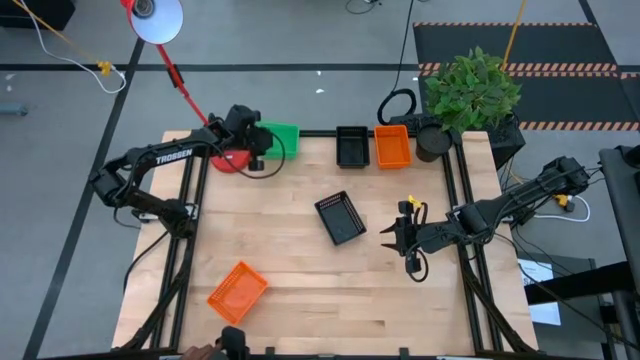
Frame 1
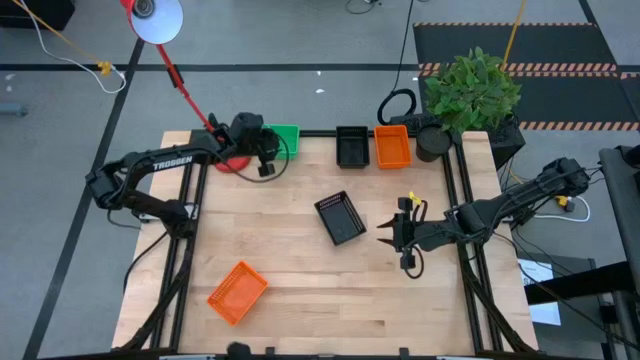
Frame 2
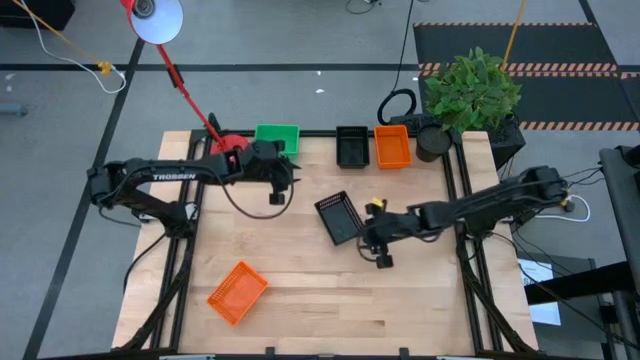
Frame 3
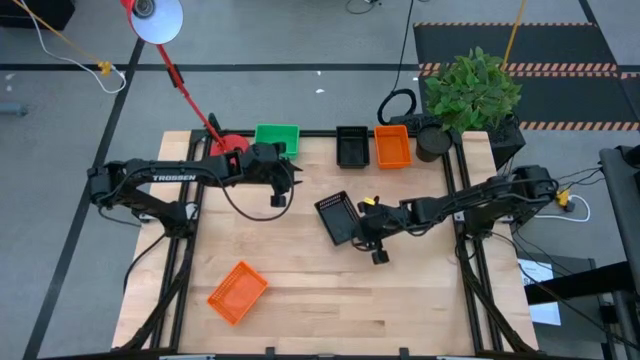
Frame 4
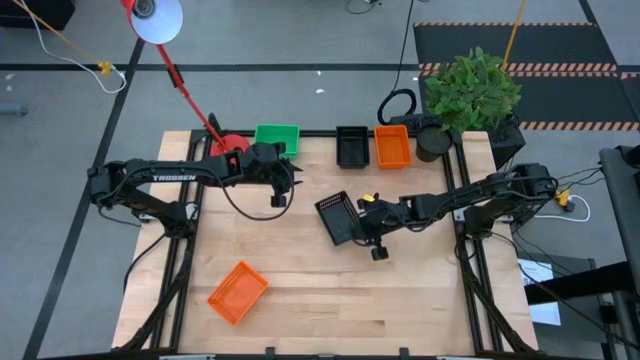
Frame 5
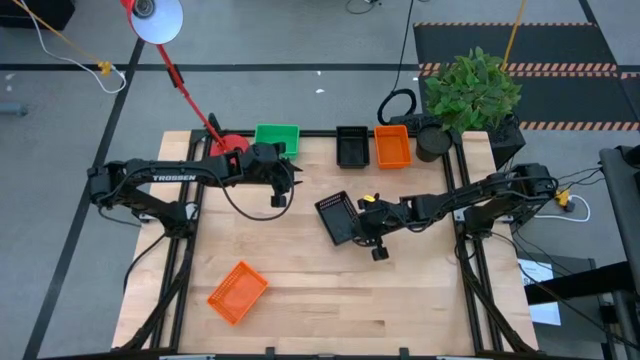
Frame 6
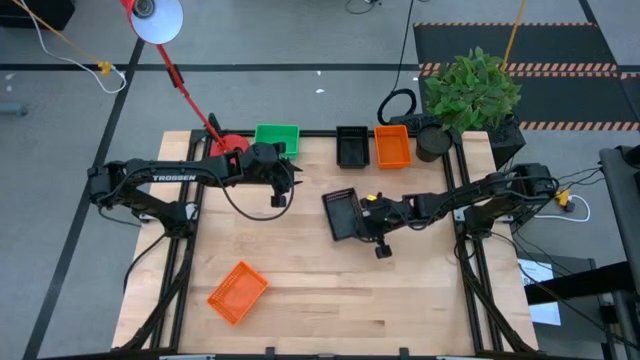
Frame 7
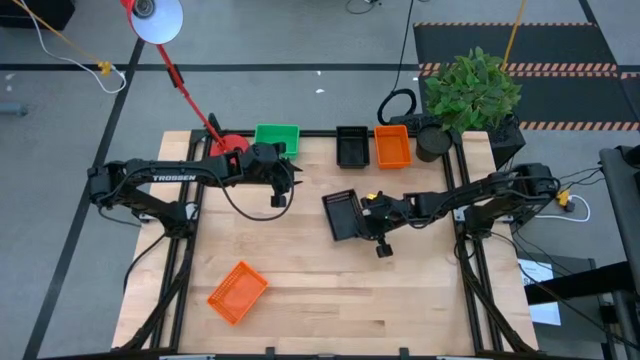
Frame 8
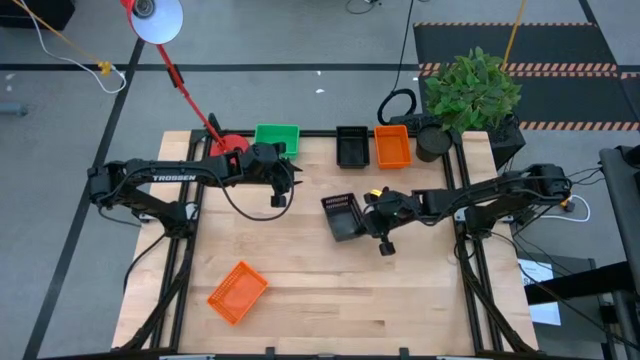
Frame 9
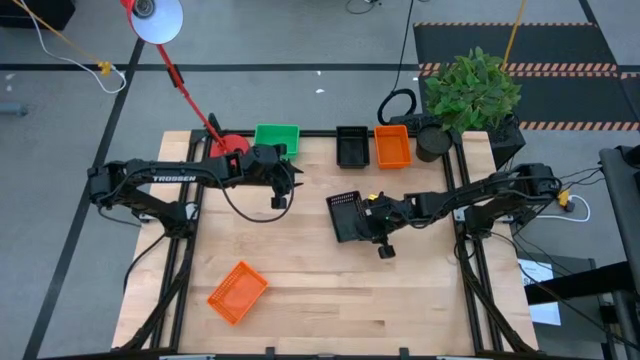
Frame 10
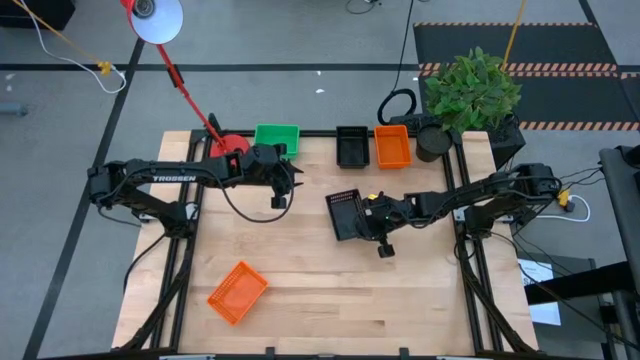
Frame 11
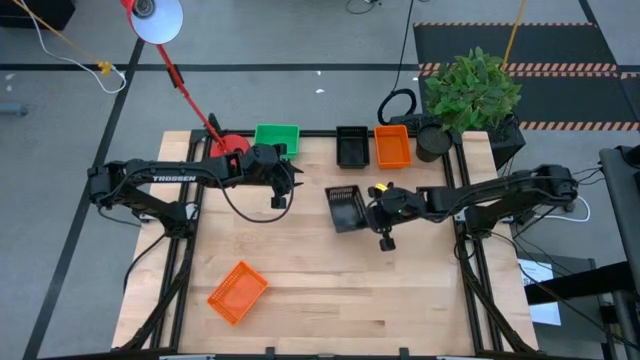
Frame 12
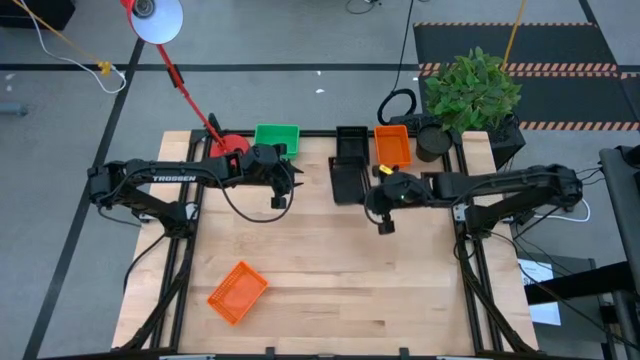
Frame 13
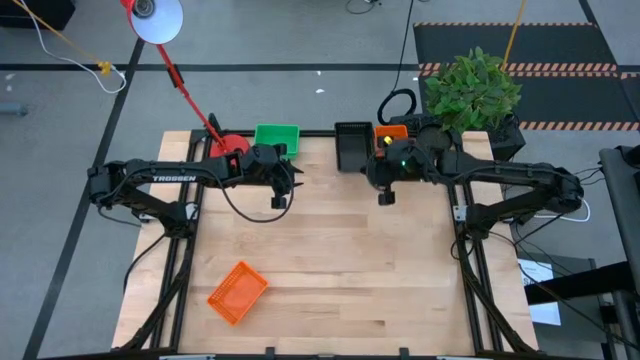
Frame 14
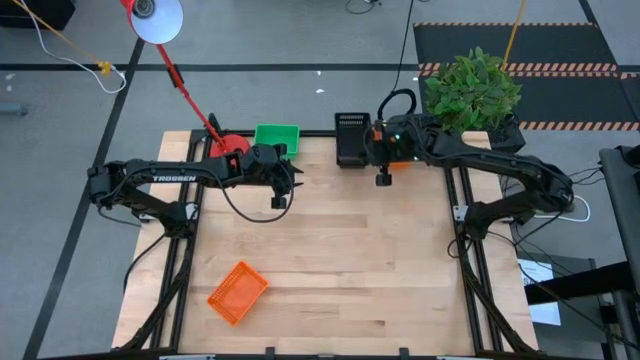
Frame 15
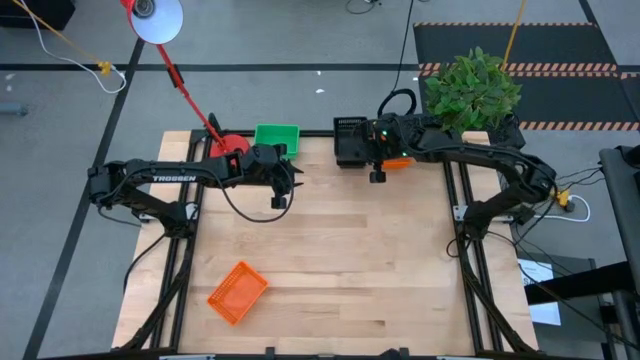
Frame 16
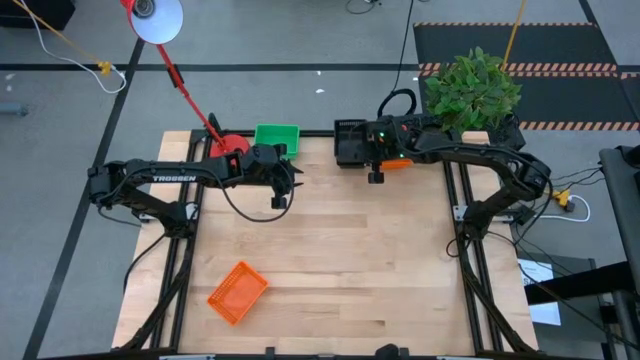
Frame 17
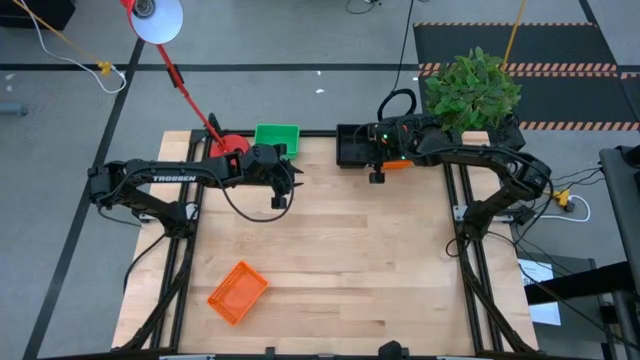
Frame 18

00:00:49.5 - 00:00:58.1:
Stack the bottom black bin on the top black bin

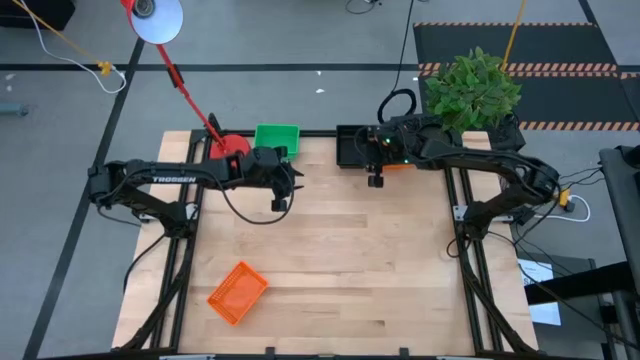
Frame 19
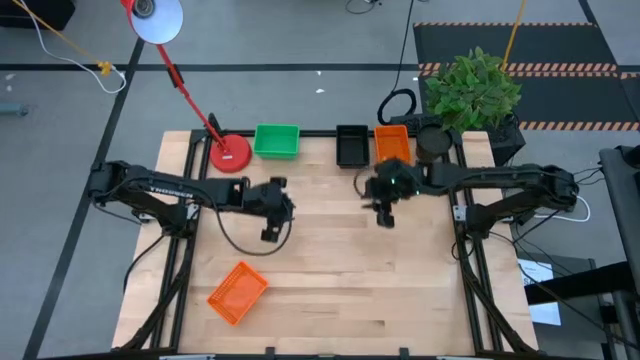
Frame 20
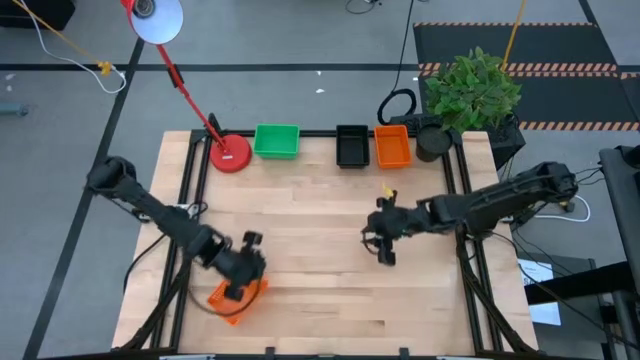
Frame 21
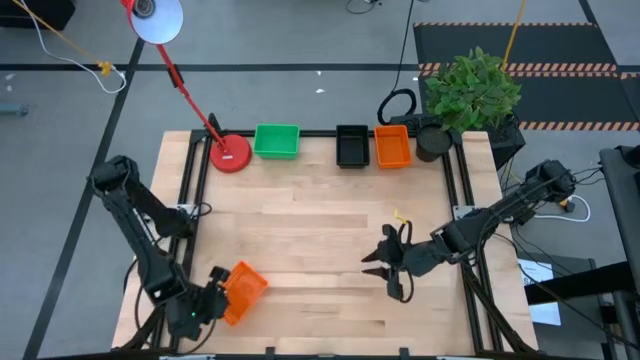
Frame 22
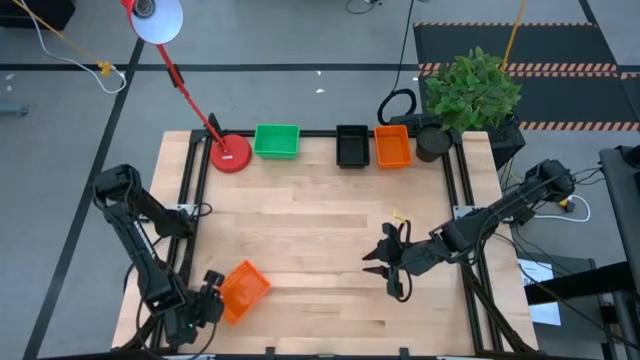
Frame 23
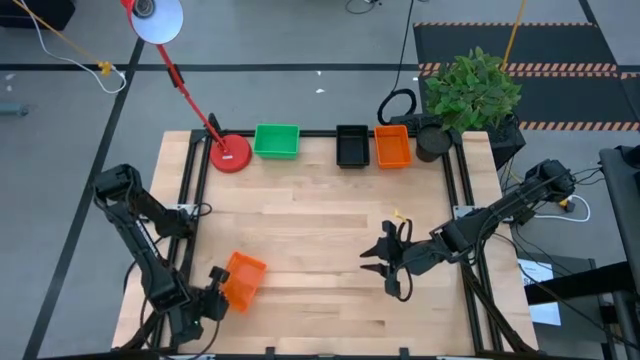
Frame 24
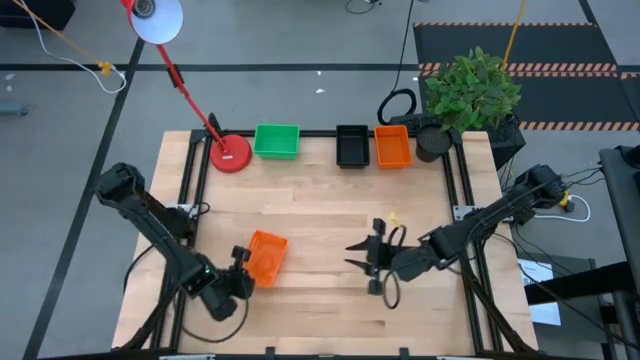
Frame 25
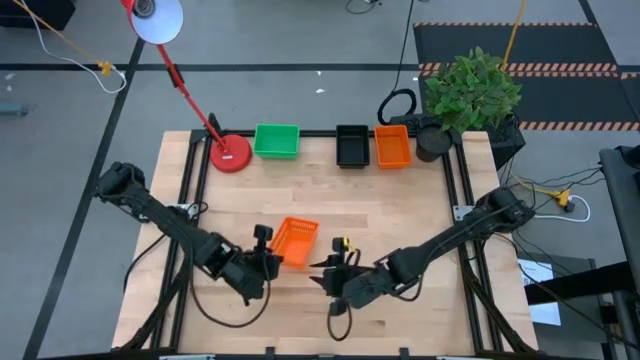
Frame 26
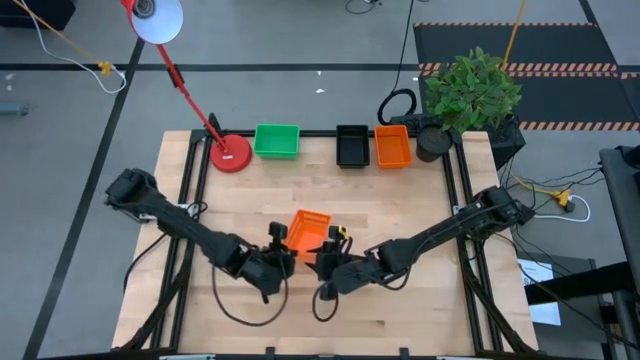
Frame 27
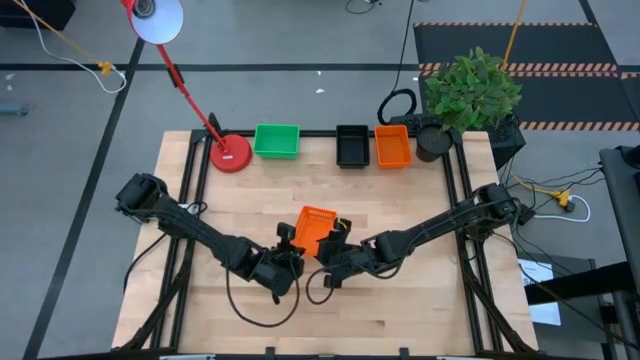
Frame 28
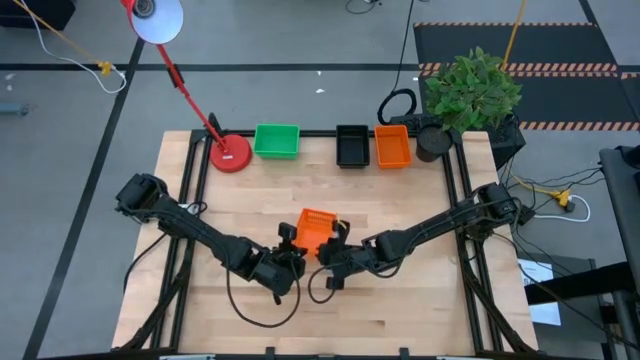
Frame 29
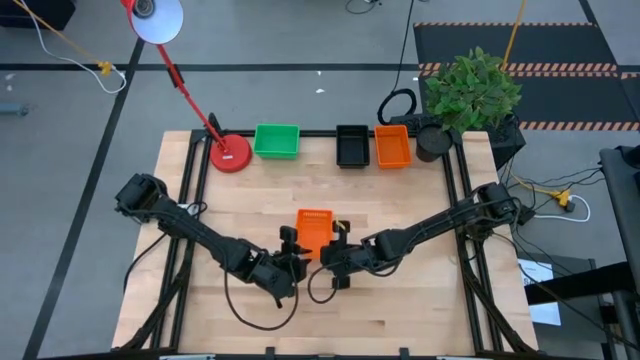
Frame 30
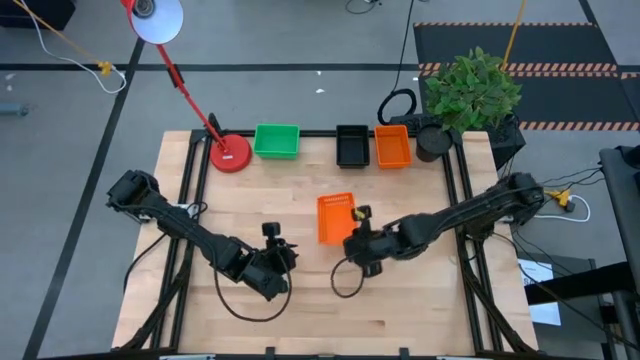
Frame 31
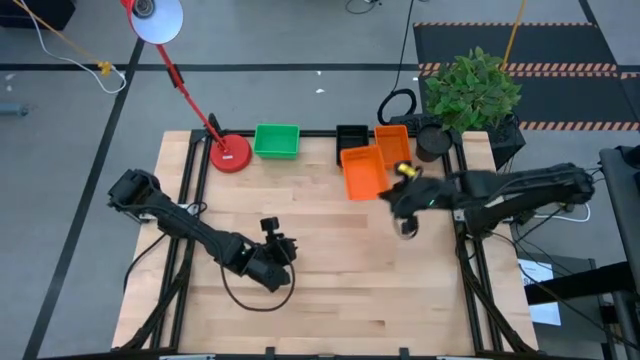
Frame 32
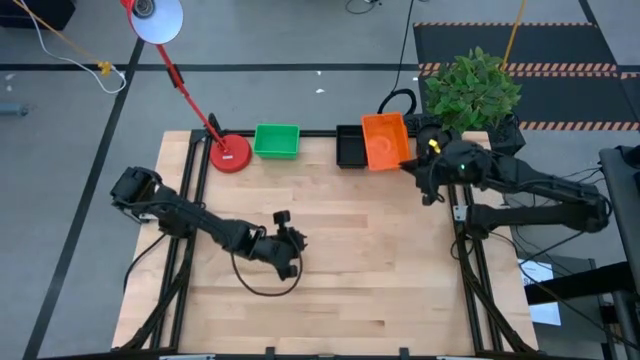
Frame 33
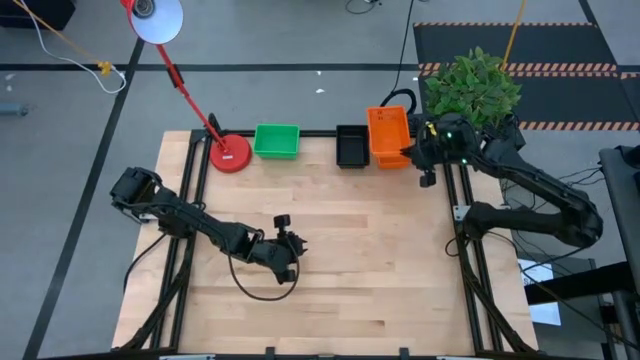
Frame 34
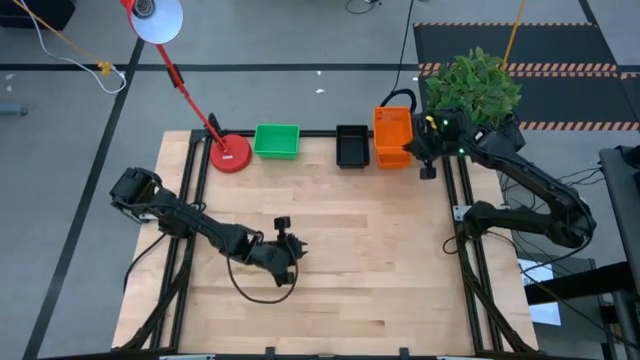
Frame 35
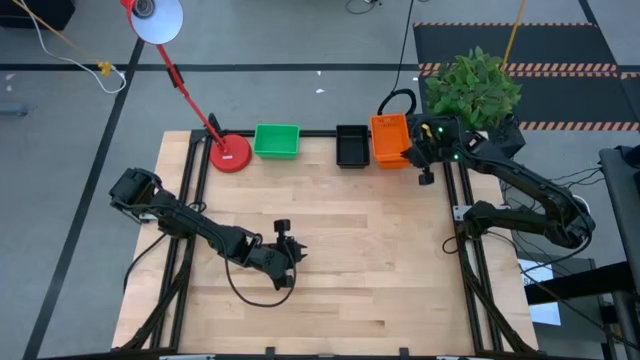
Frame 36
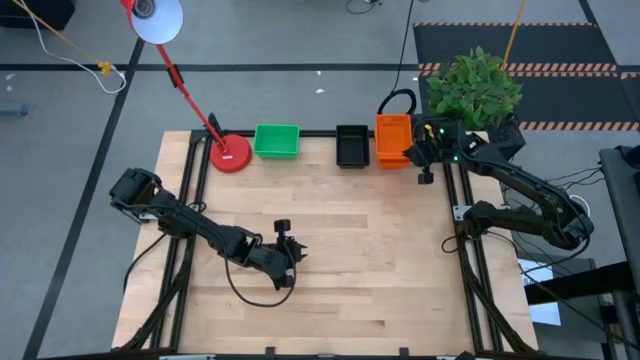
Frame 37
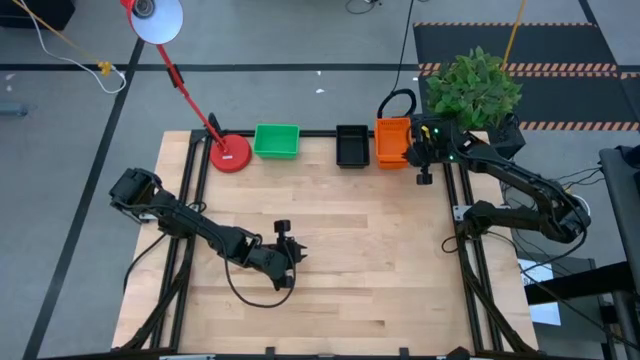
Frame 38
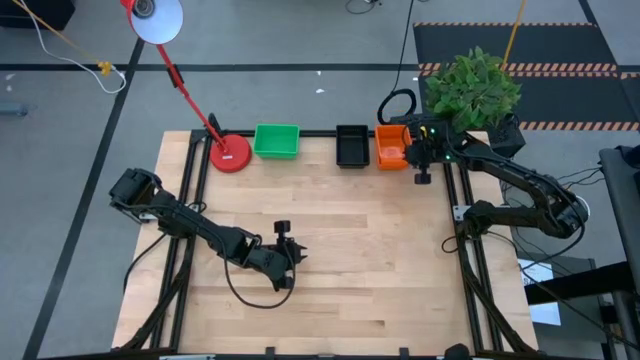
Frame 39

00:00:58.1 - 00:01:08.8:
Stack the bottom orange bin on the top orange bin
